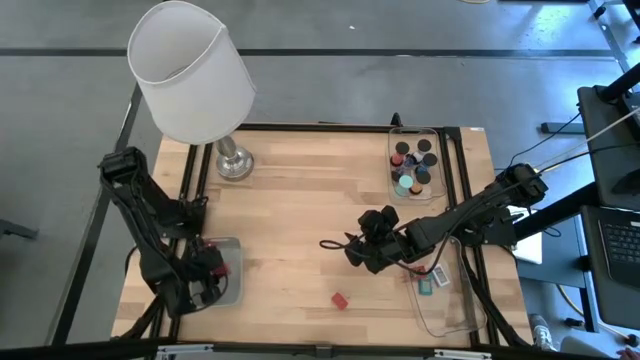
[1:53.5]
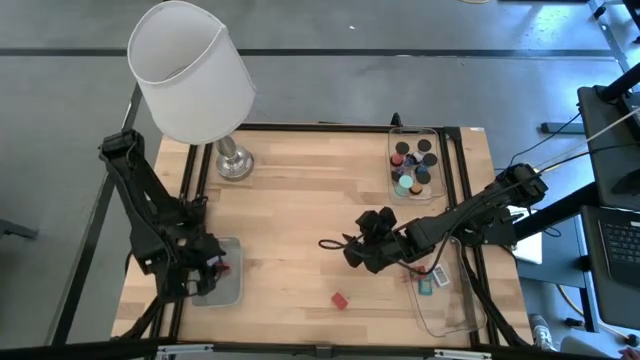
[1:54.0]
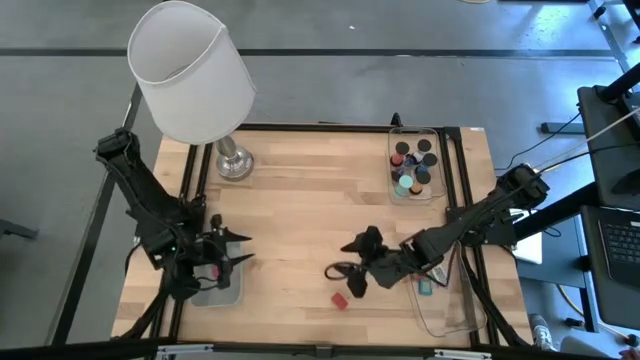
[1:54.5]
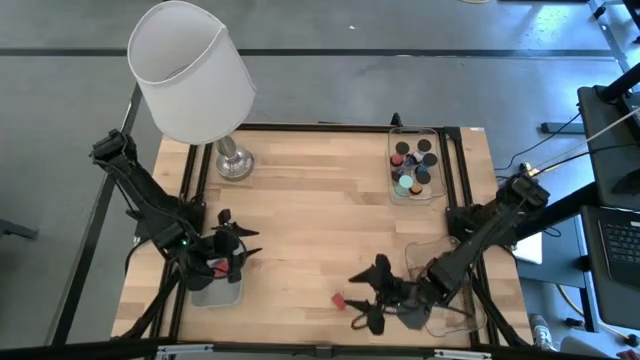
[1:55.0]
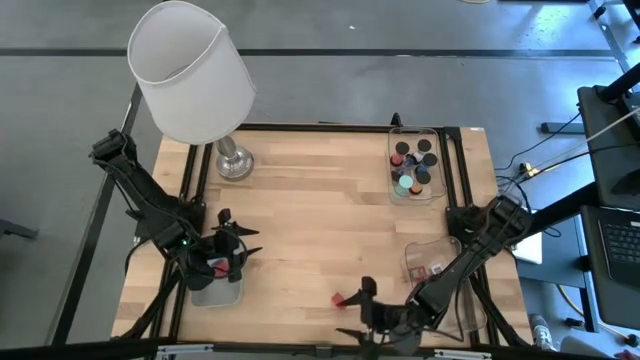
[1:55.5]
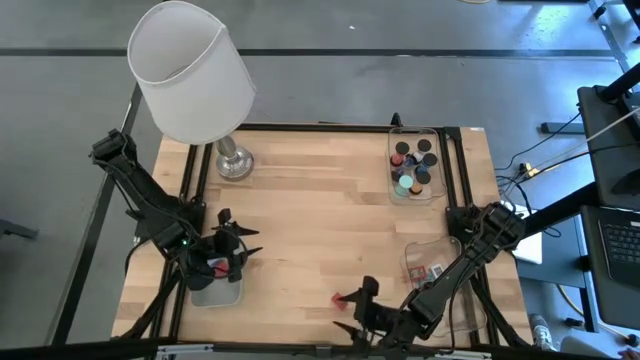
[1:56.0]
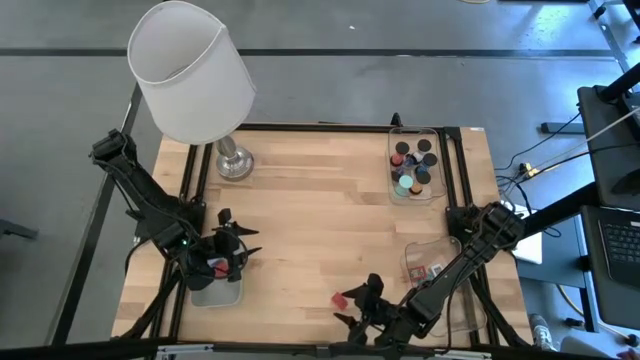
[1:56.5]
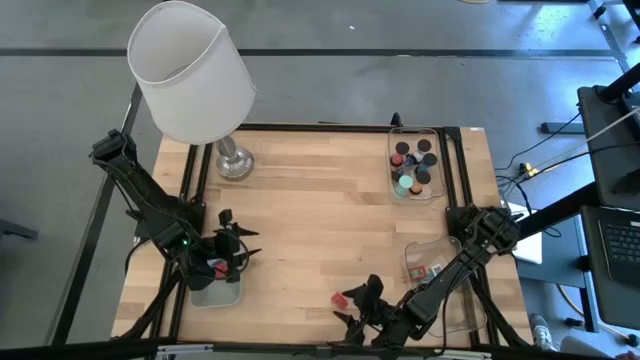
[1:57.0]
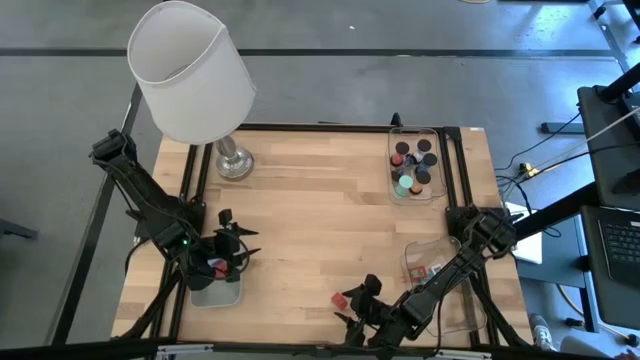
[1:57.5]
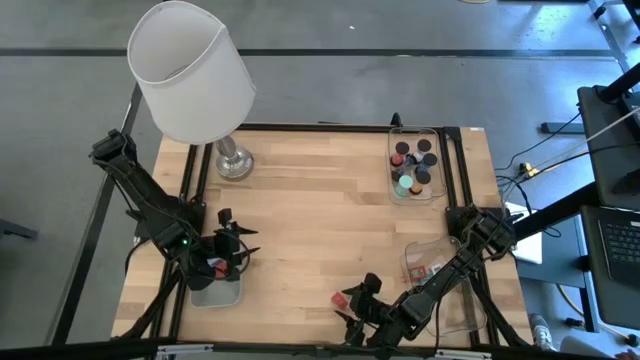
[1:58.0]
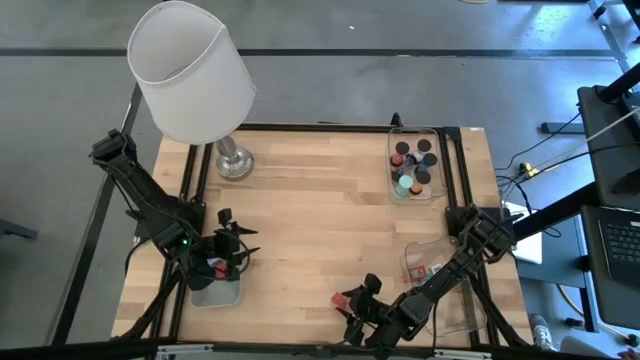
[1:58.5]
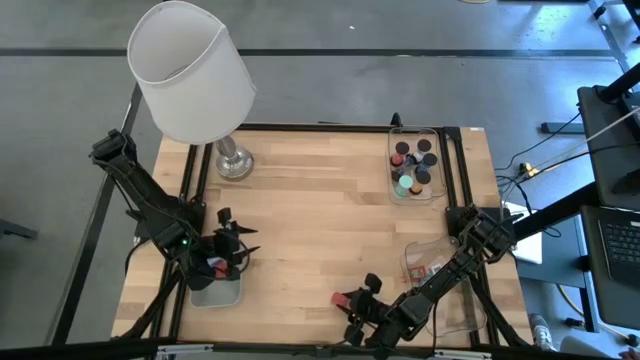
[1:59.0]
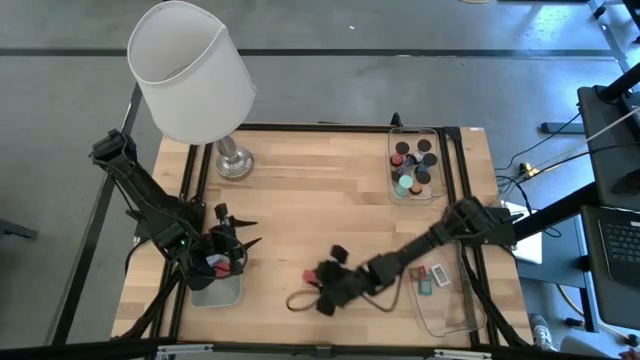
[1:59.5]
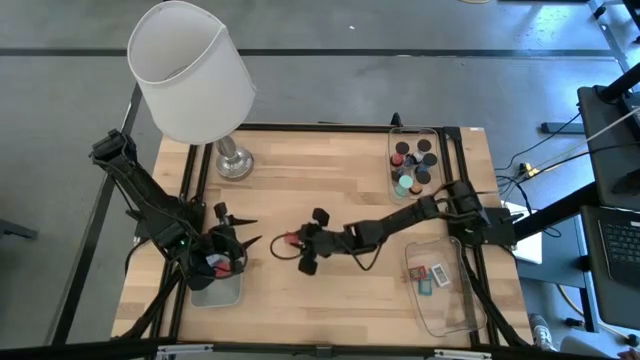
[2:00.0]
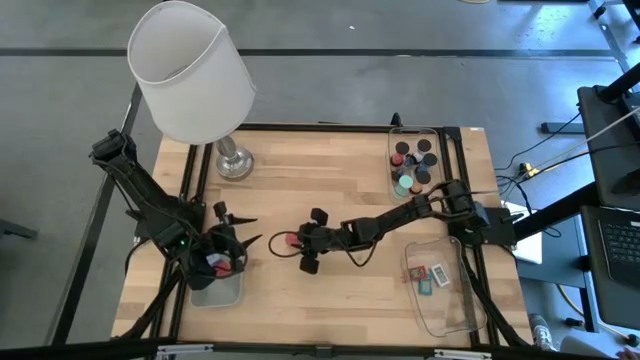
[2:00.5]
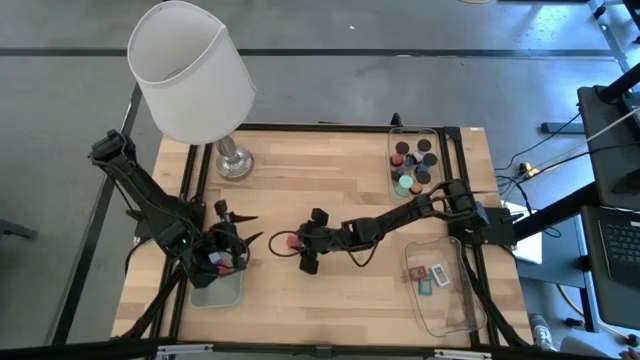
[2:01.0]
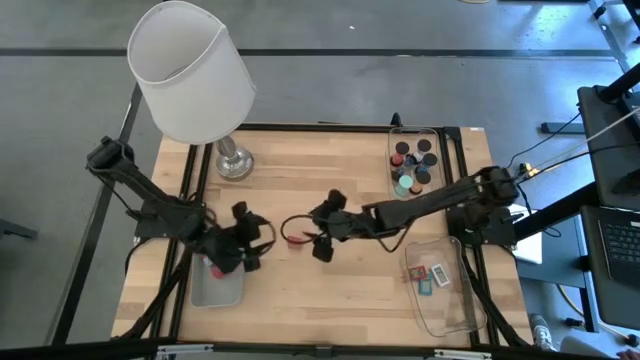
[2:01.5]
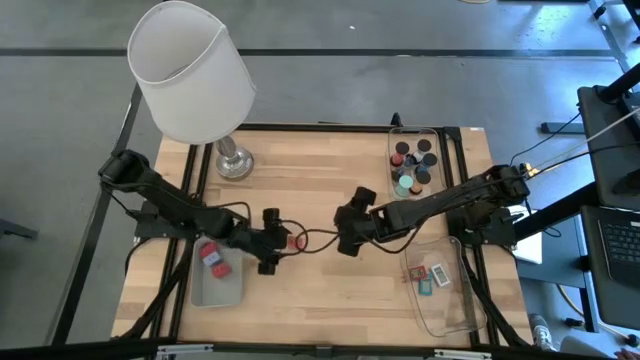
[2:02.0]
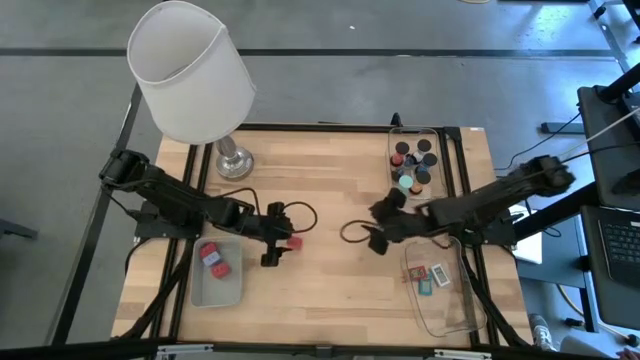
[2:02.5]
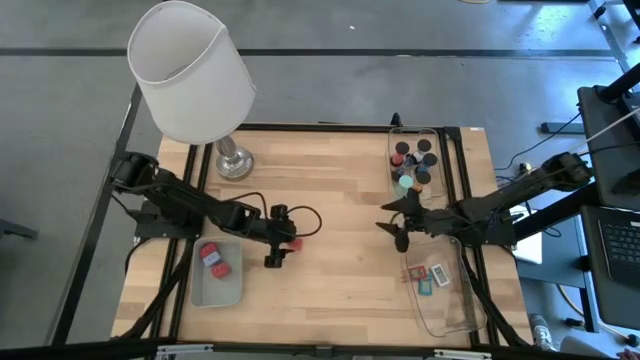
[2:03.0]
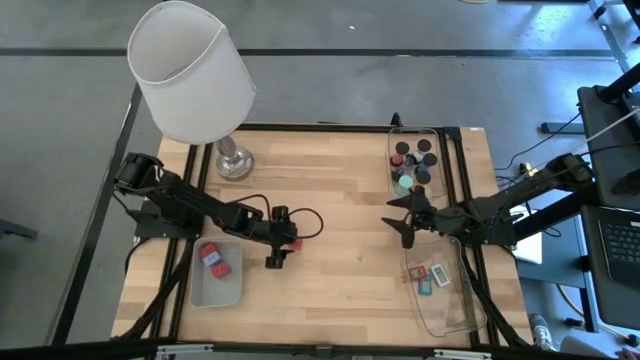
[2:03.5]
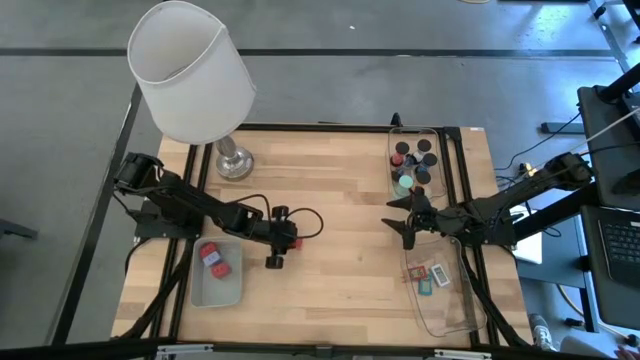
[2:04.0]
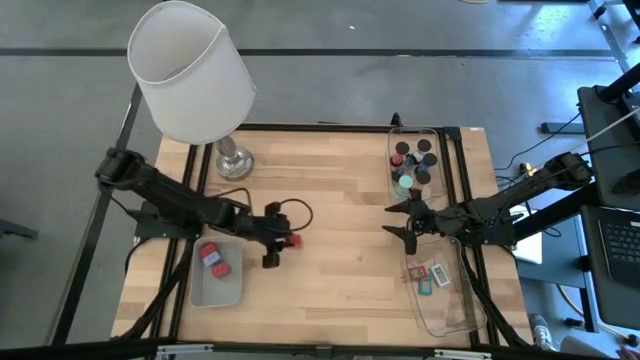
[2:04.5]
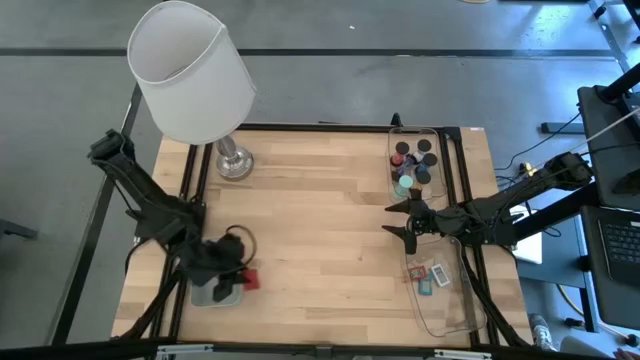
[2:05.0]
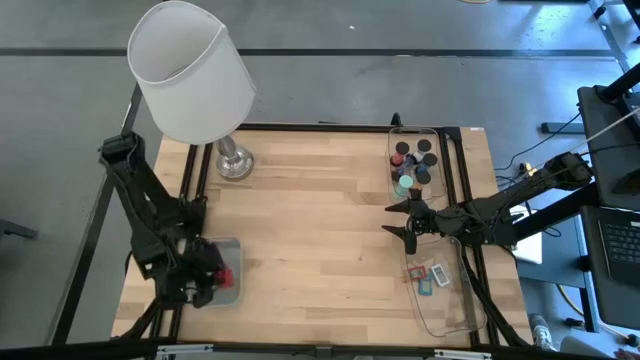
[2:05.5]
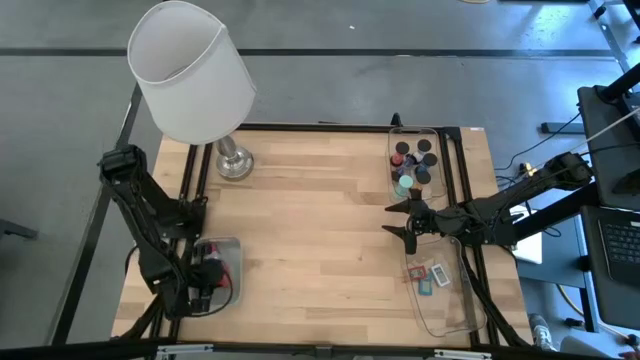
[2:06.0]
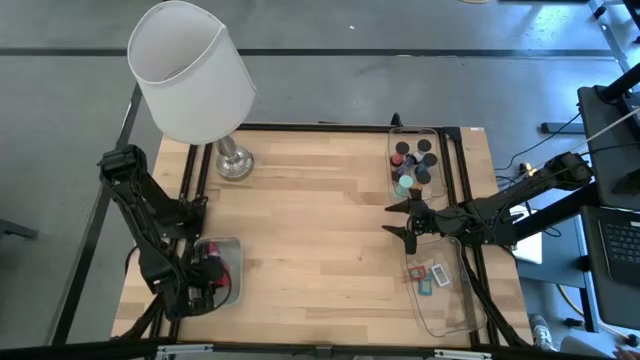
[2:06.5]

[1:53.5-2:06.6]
Task: Pick & Place Office items
Put the orange charger adapter into the white bin

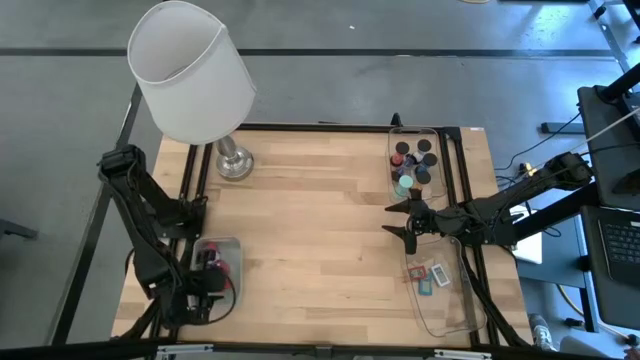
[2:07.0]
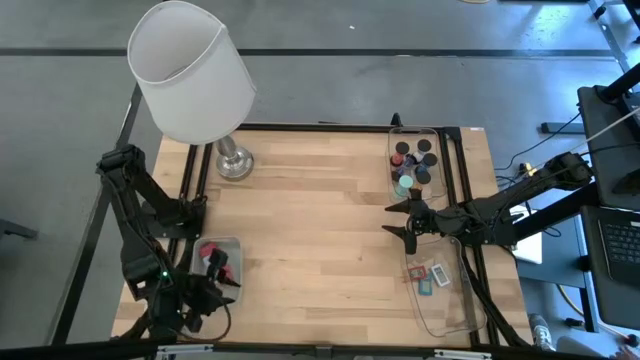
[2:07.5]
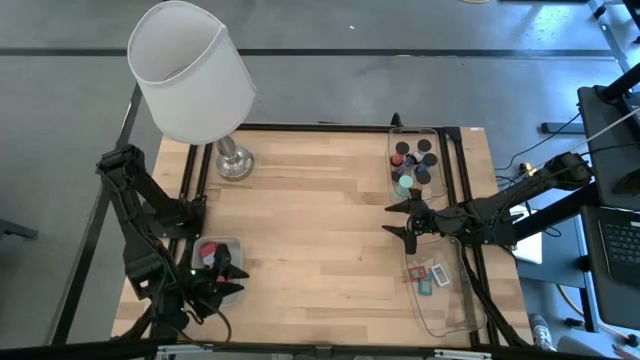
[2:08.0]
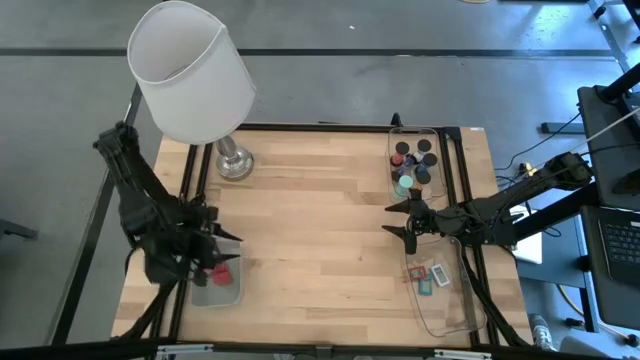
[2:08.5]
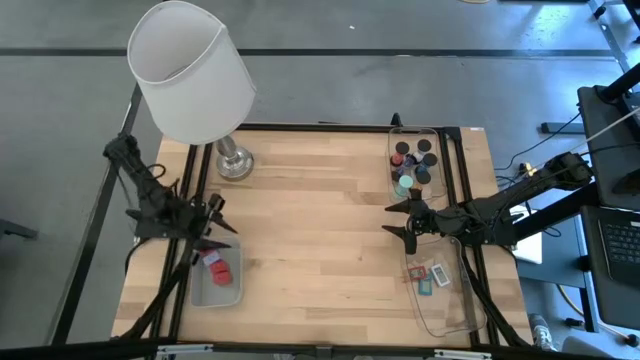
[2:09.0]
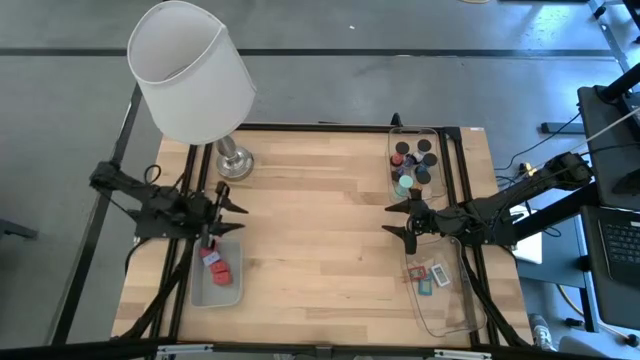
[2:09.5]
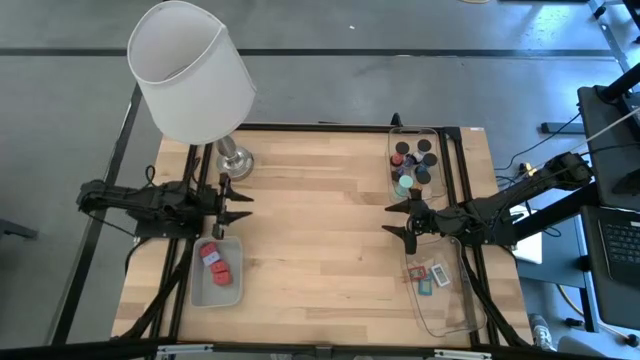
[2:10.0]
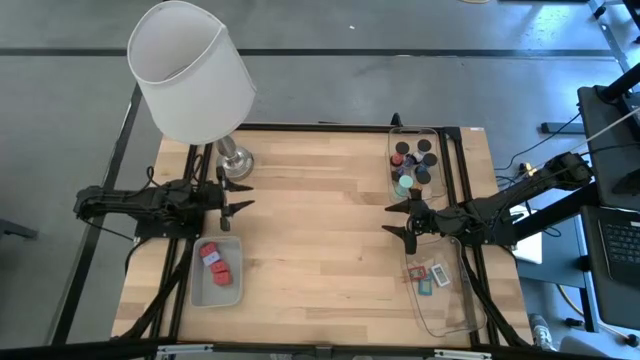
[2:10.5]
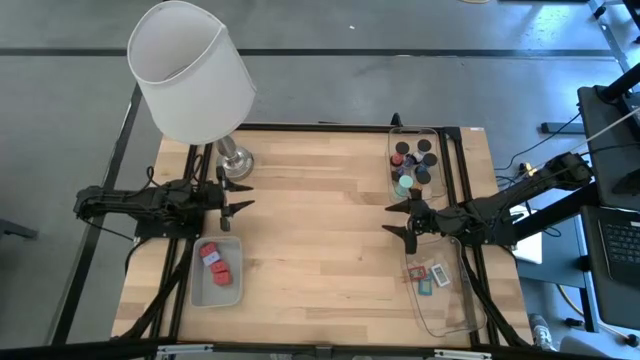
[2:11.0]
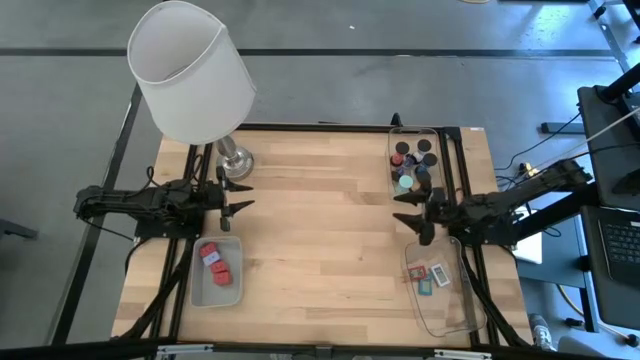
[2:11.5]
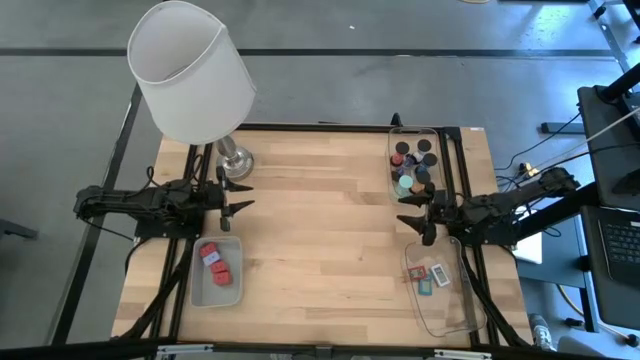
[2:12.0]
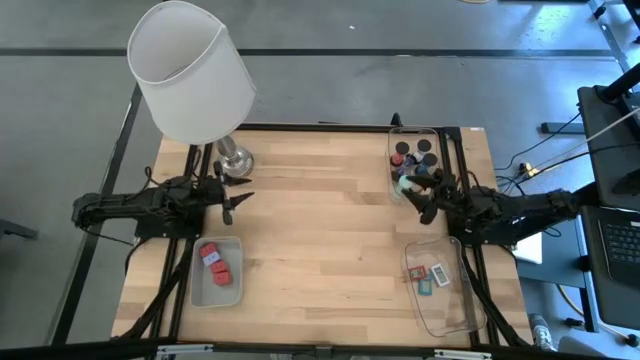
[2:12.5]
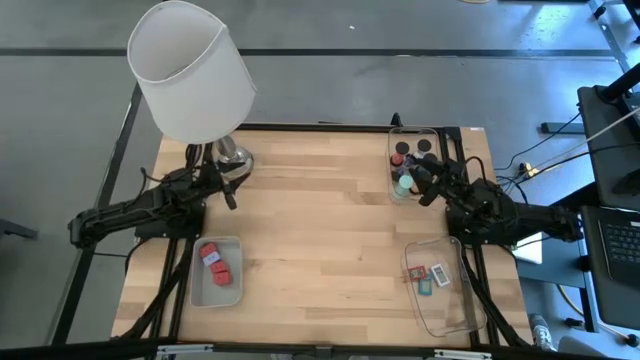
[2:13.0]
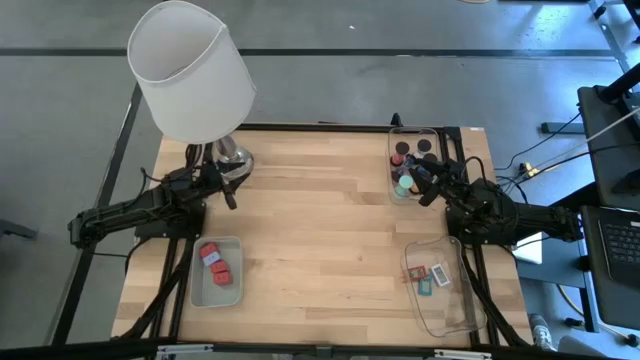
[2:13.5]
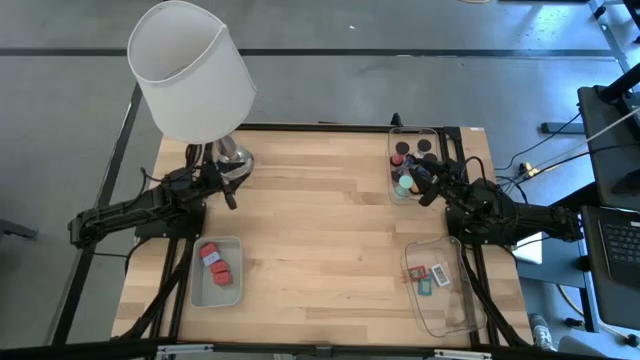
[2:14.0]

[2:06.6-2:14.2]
Return to Home Position
